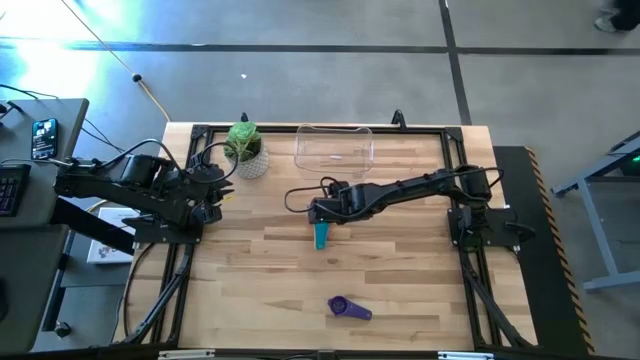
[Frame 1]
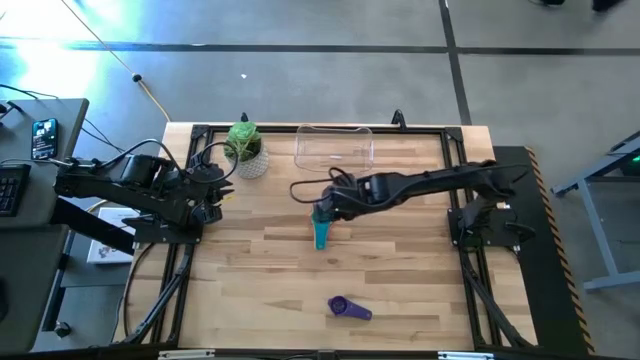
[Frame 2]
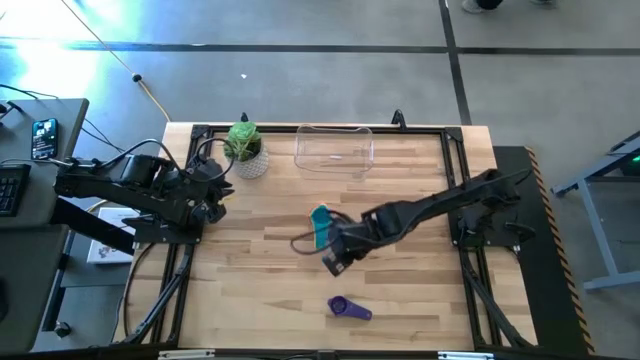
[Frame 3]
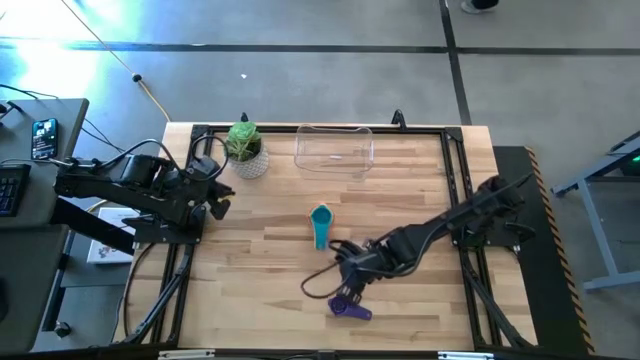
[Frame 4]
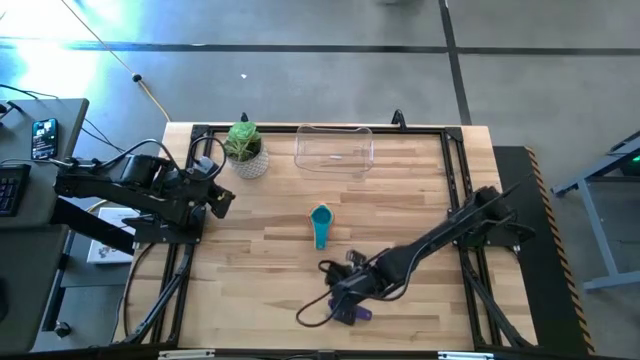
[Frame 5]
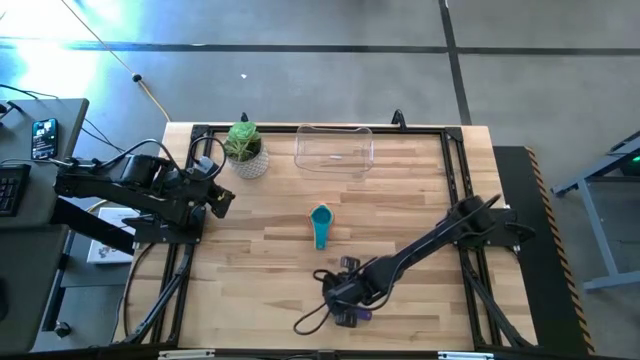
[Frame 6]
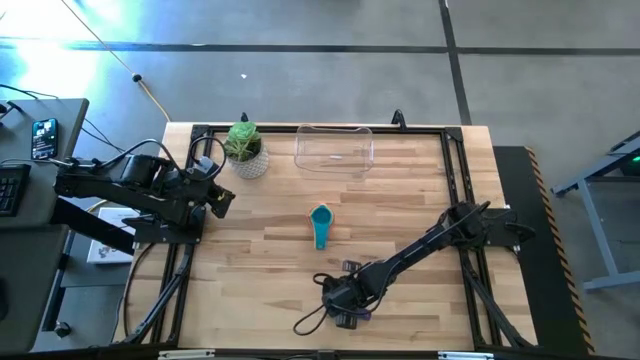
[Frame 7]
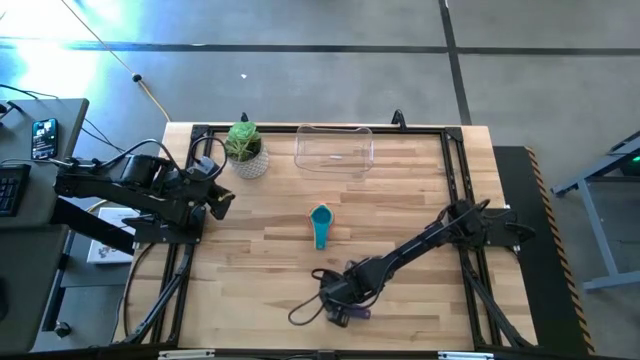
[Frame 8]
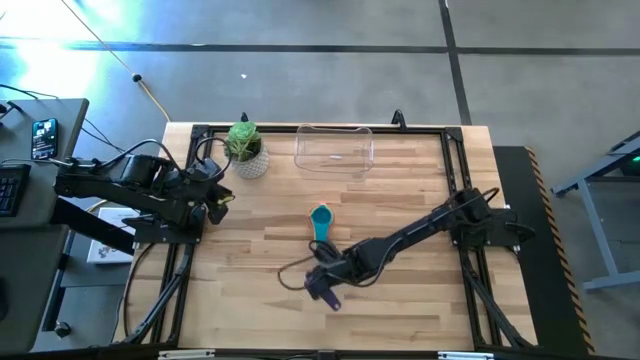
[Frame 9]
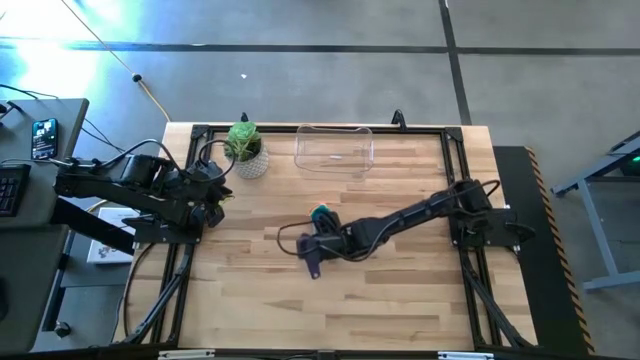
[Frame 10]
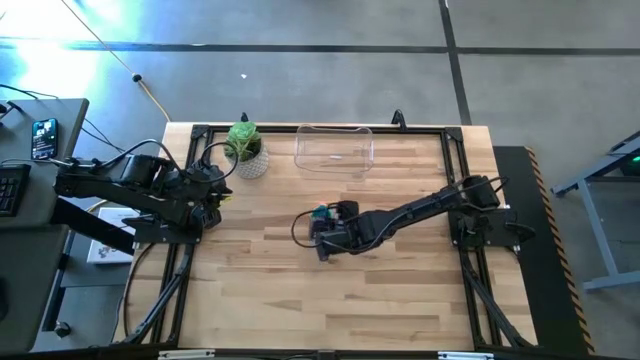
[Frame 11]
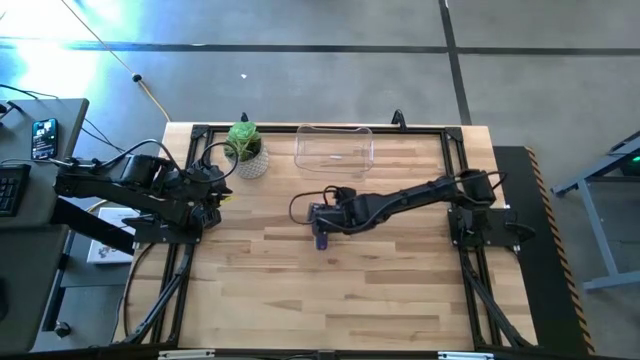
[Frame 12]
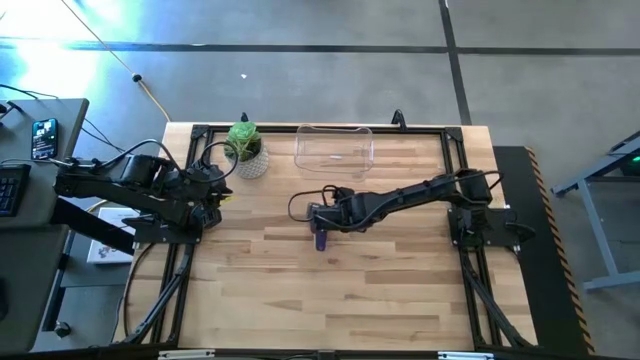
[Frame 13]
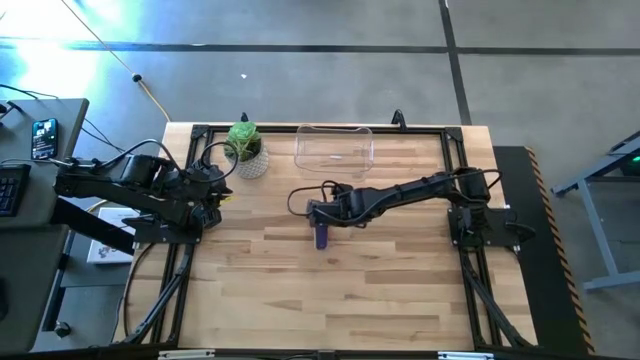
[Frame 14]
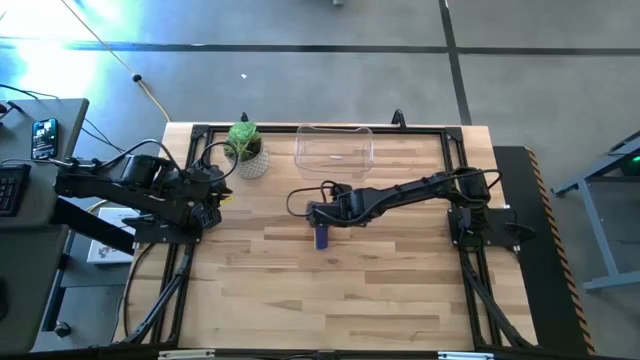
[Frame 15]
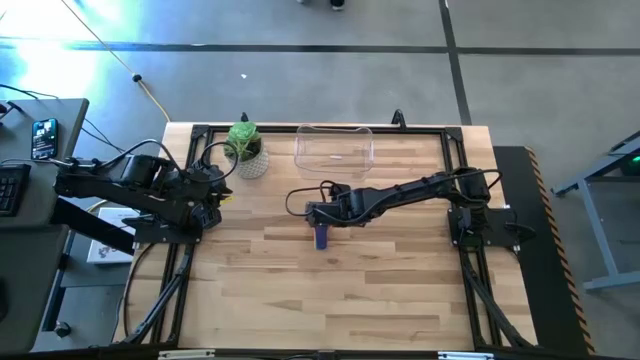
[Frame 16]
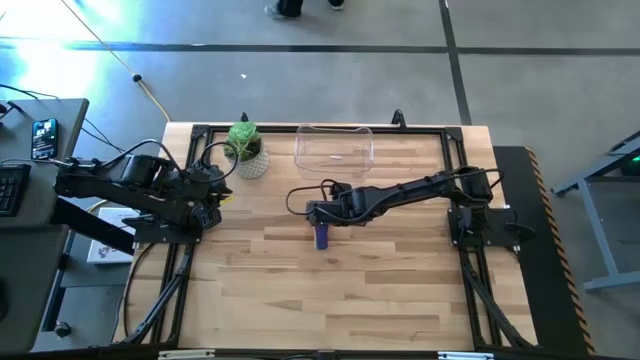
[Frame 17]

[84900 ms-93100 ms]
Task: Nest measuring cups in basket
Stack the blue measuring cup on top of the blue measuring cup

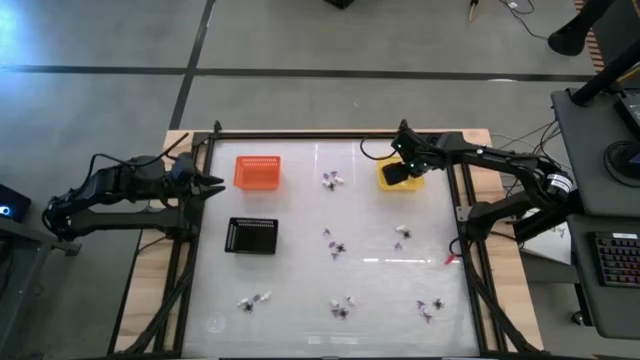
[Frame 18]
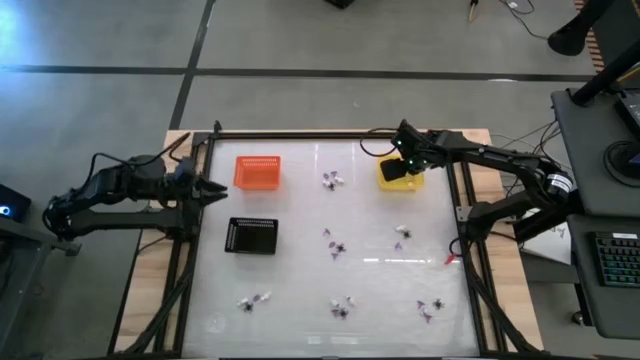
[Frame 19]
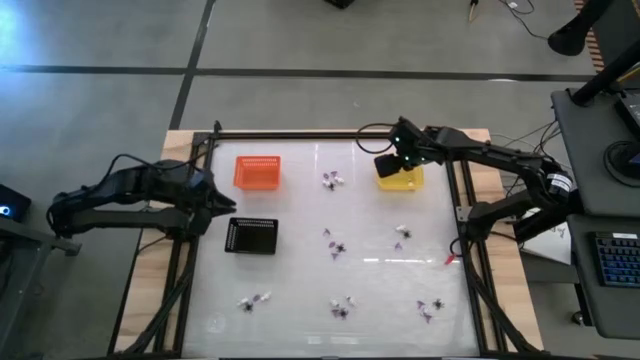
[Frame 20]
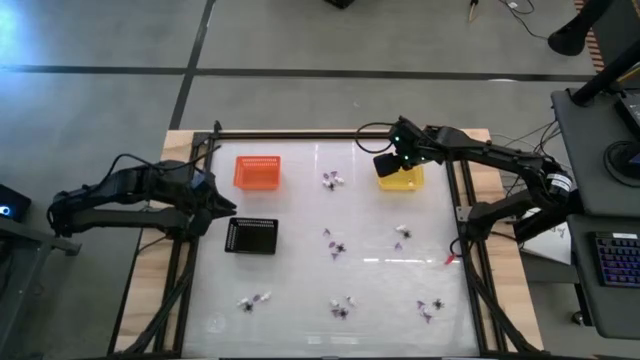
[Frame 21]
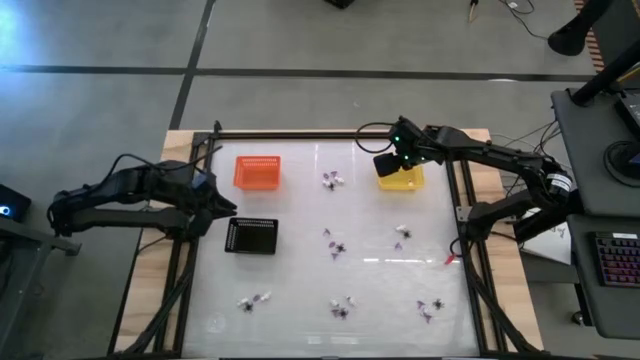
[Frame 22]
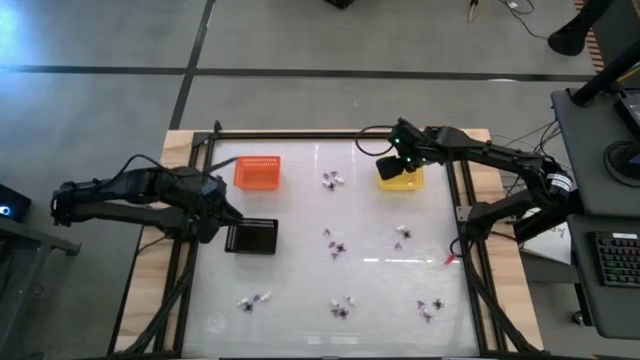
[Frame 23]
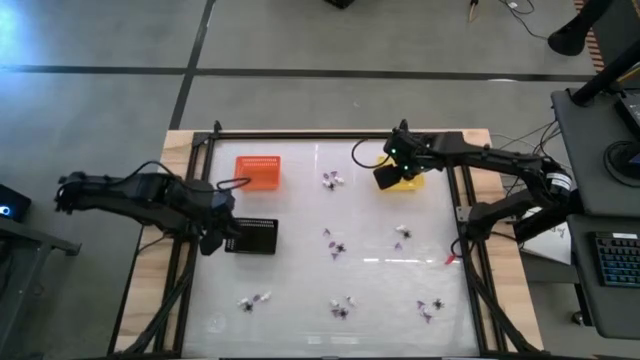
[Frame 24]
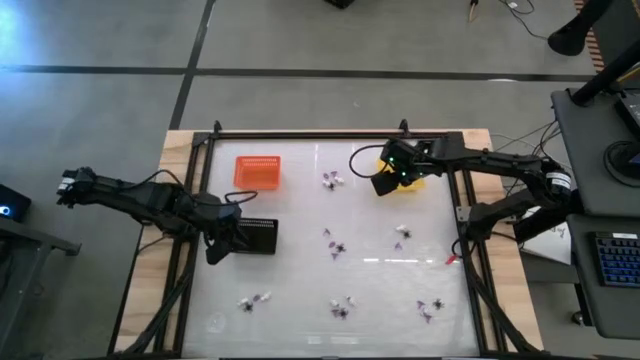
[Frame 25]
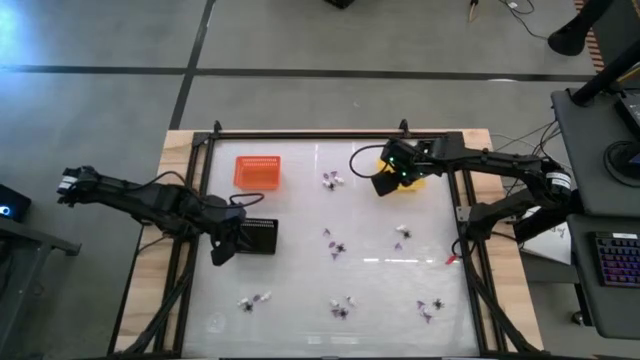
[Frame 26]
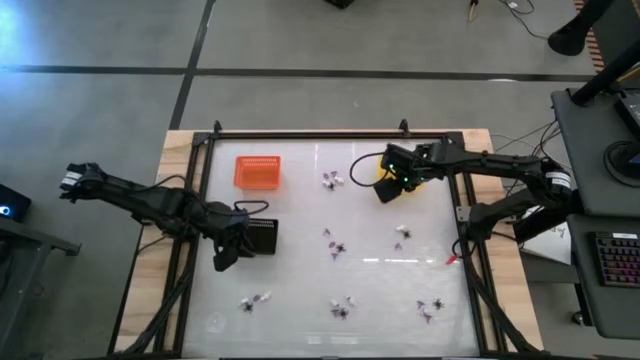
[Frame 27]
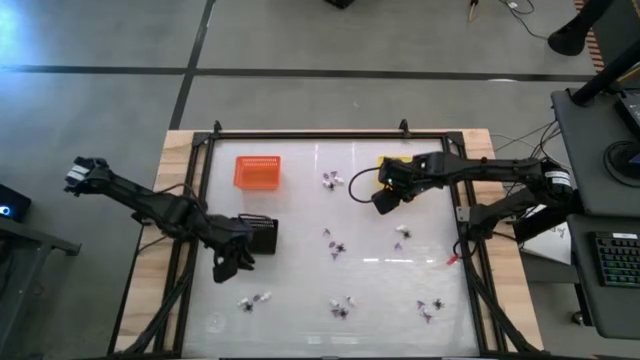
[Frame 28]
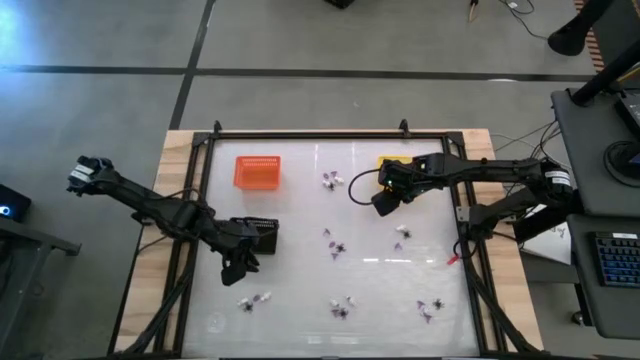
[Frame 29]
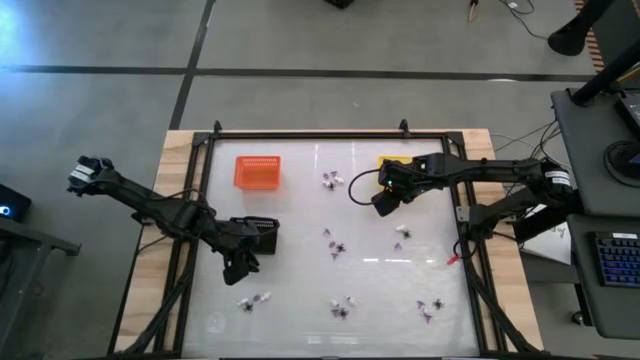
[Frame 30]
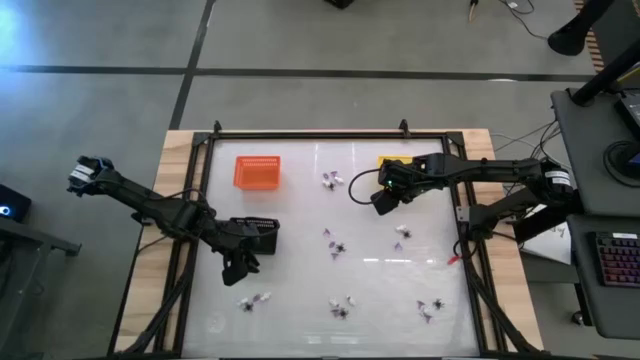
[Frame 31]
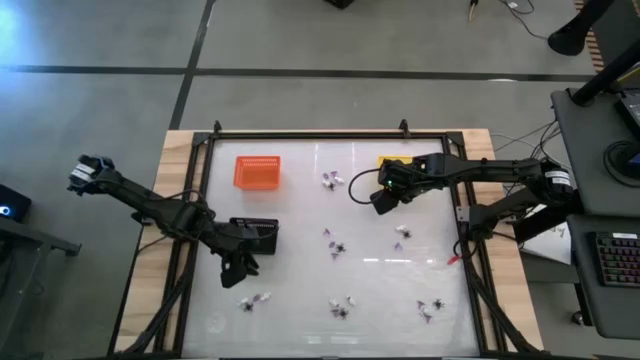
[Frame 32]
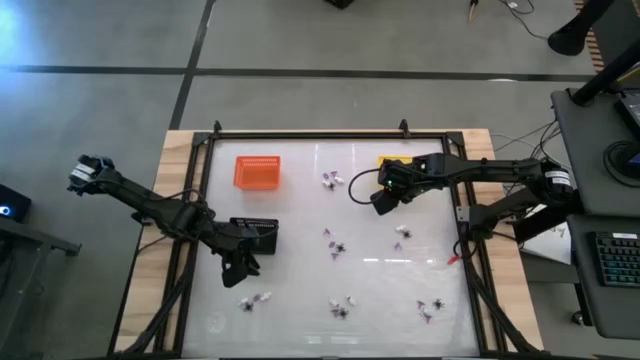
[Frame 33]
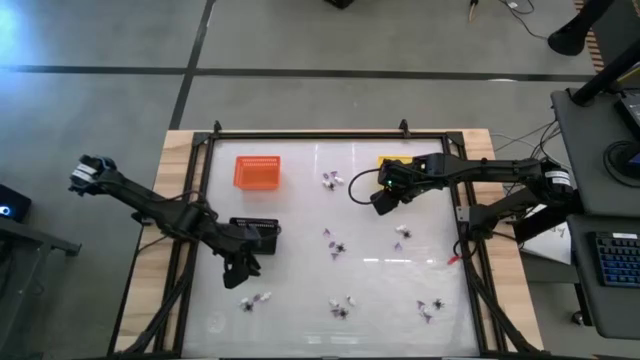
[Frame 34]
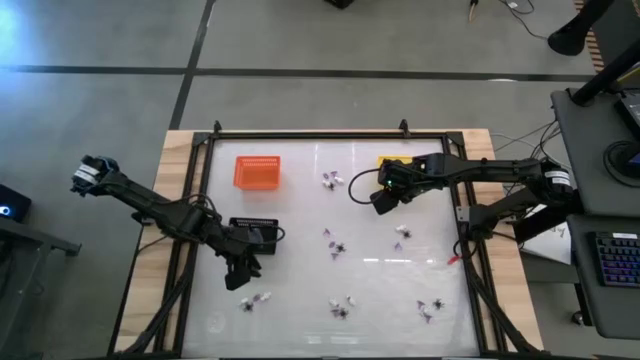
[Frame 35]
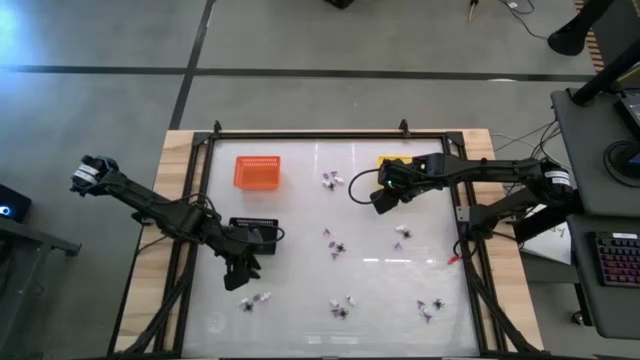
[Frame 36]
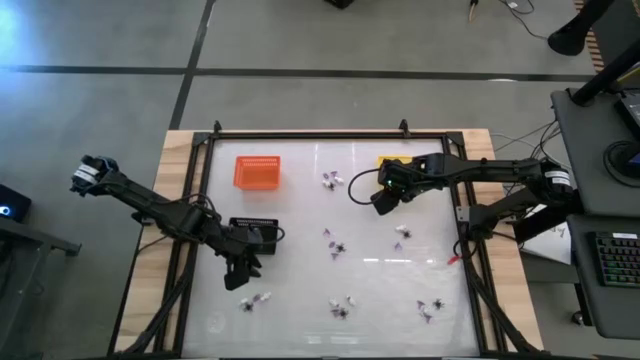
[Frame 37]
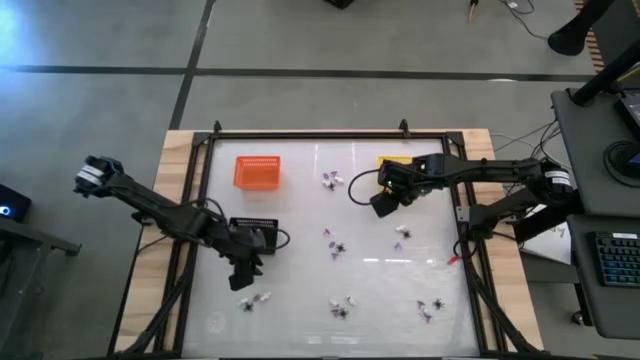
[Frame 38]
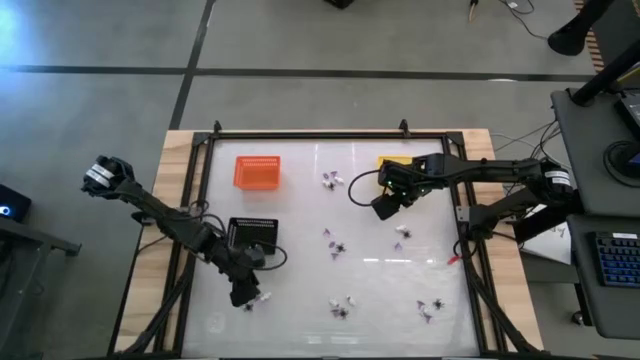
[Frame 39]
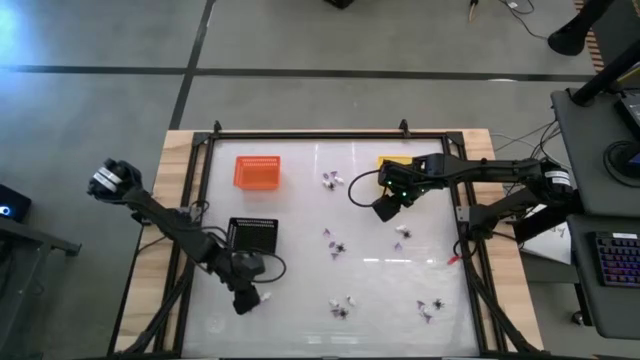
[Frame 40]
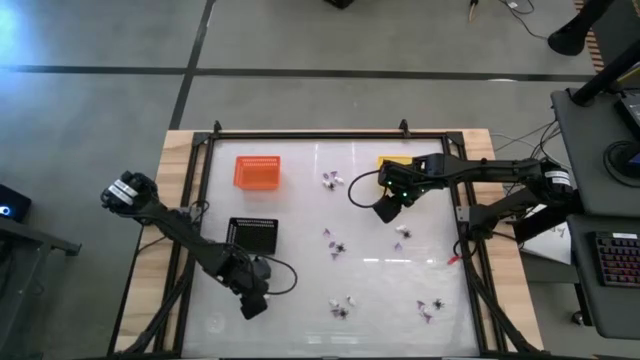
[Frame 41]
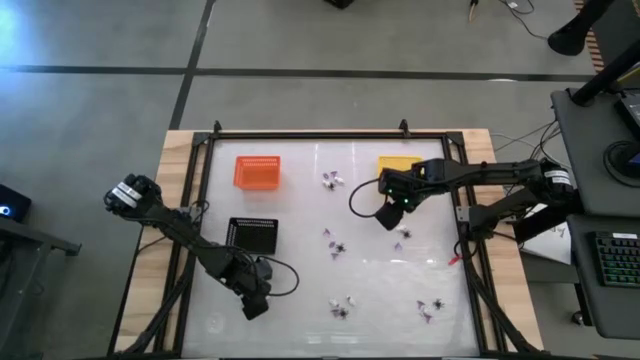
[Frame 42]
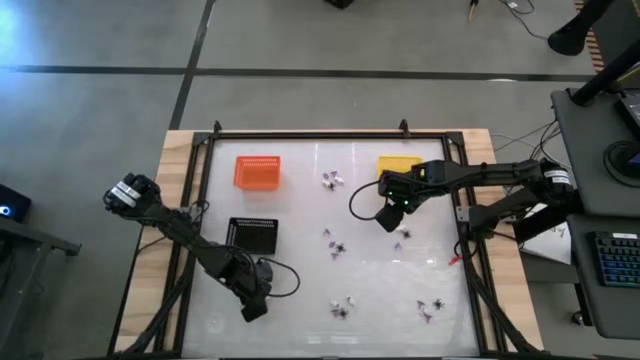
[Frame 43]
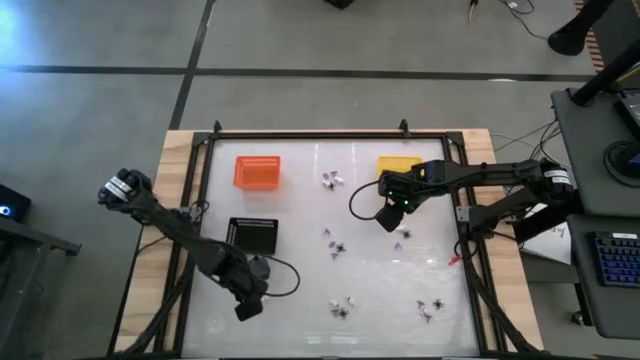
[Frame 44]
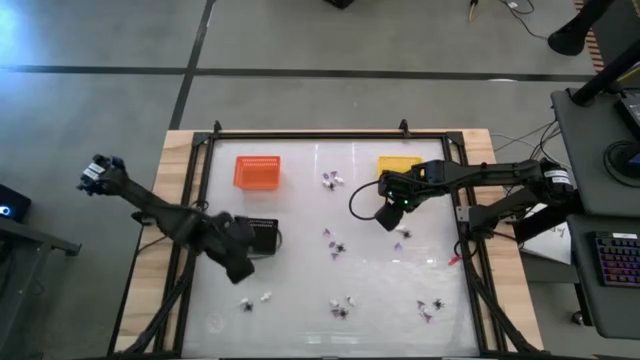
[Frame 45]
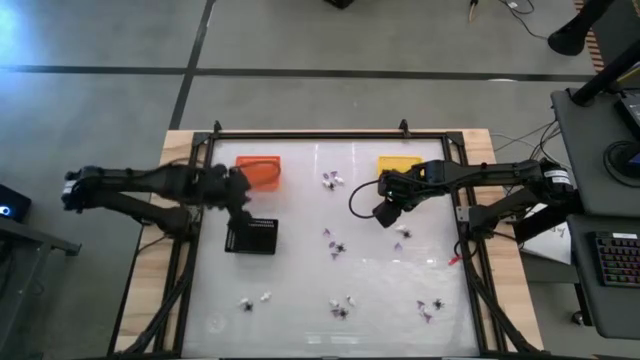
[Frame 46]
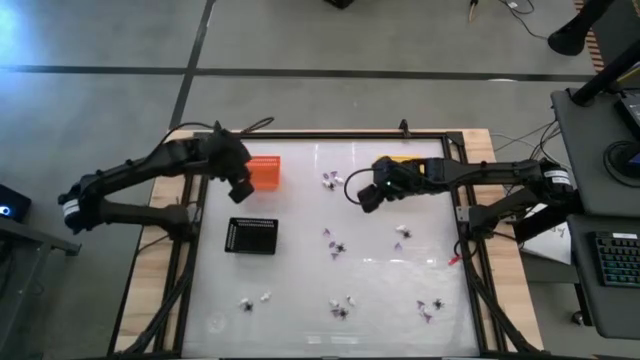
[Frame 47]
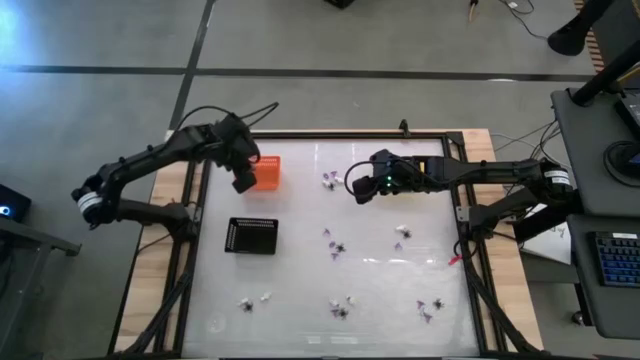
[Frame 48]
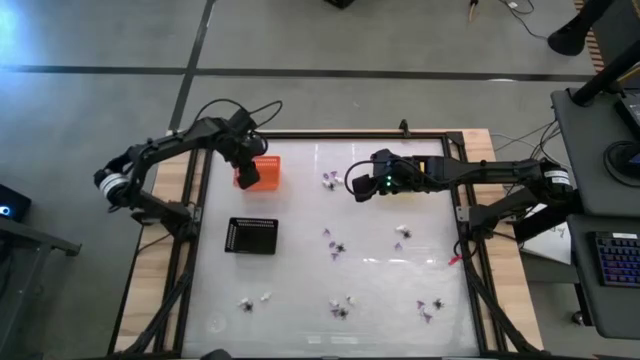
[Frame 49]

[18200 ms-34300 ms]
Task: Sort Halloween decoration
Put the violet witch hat toy into the orange bin
